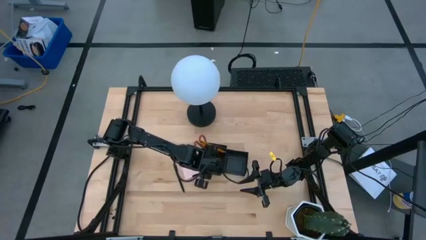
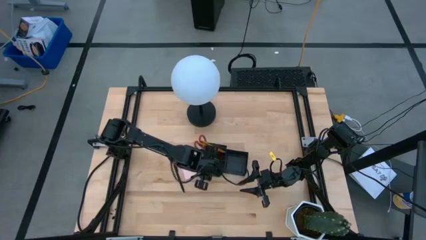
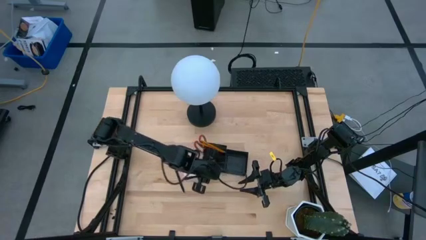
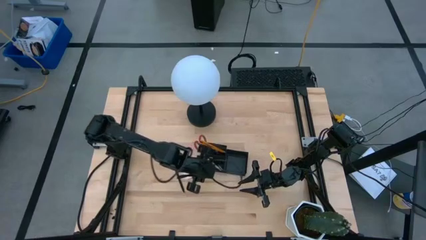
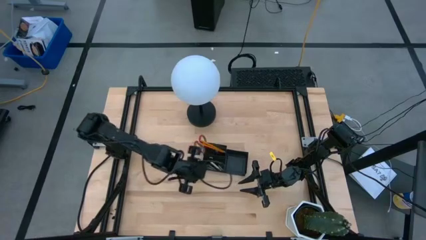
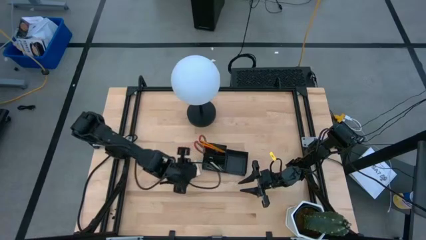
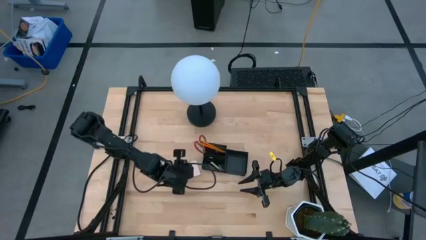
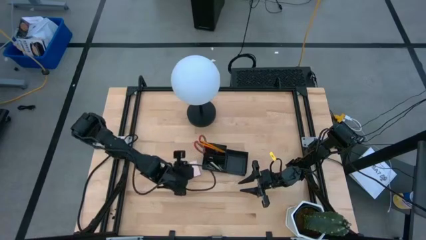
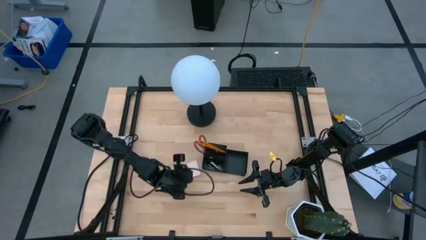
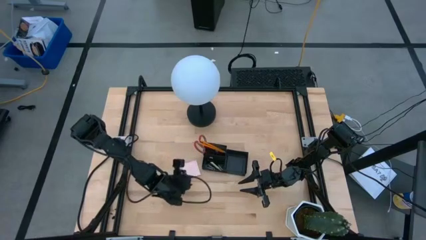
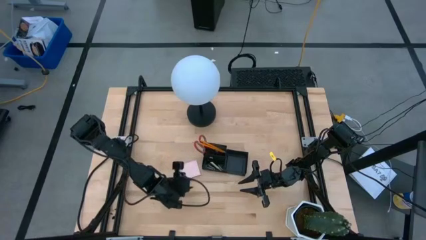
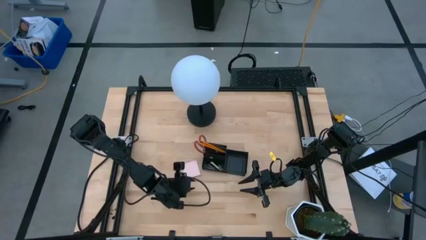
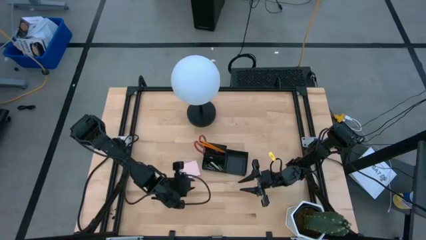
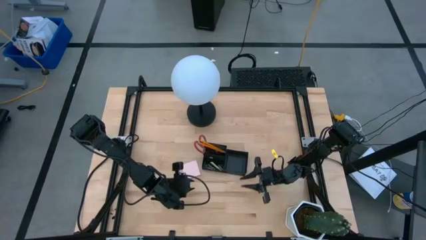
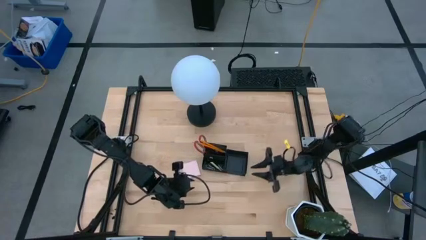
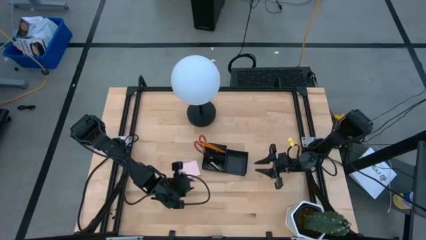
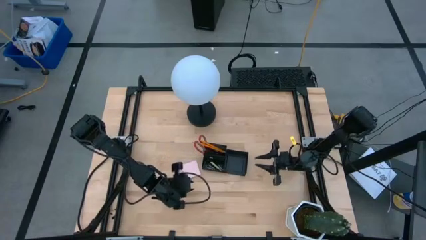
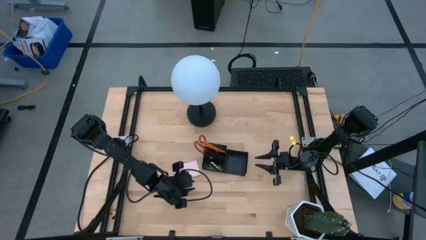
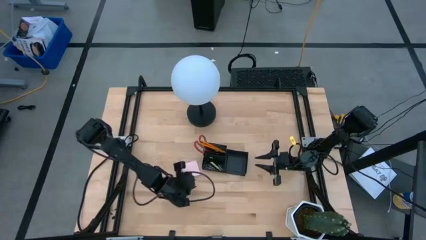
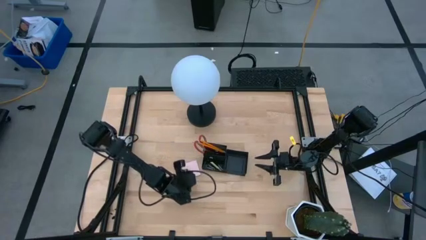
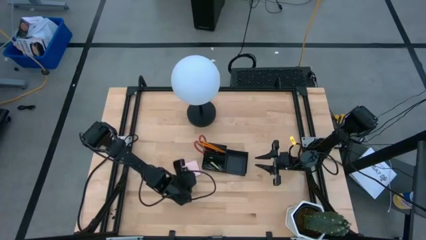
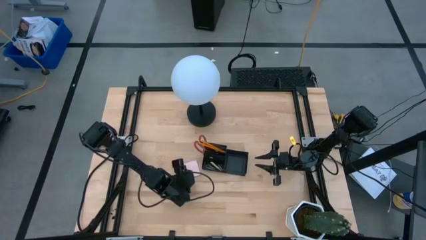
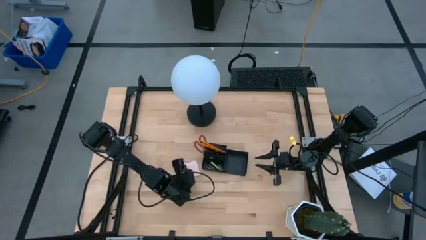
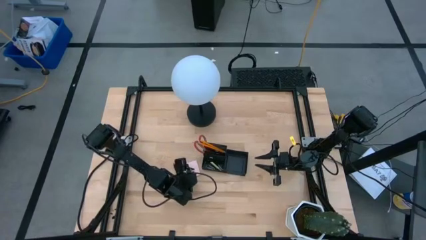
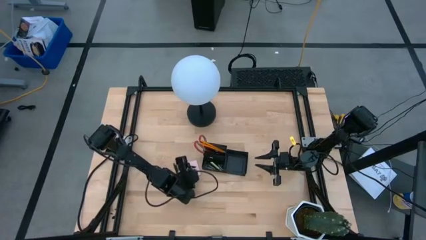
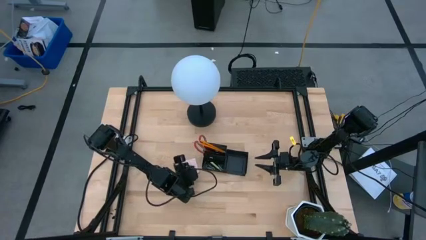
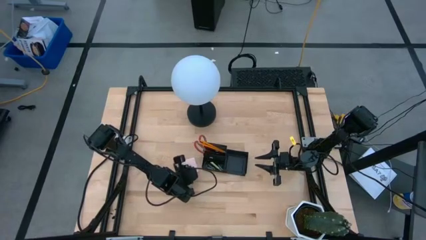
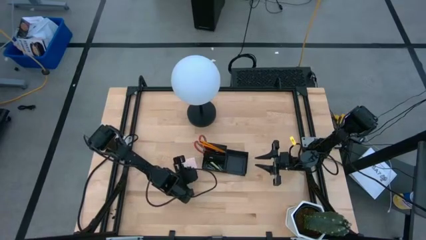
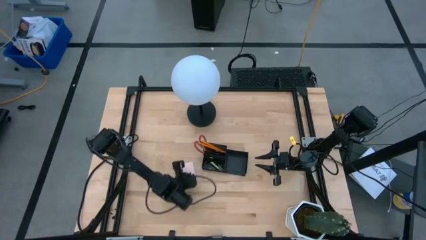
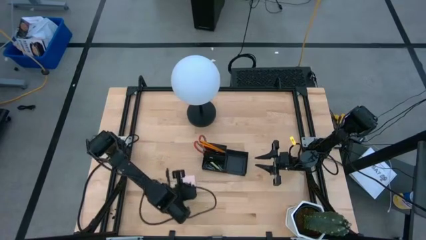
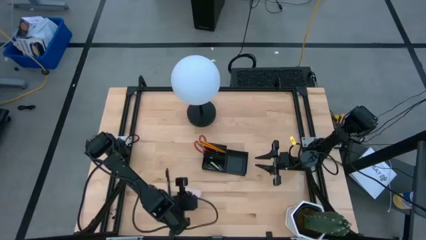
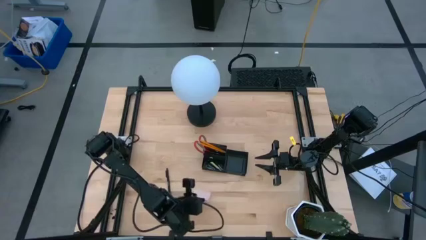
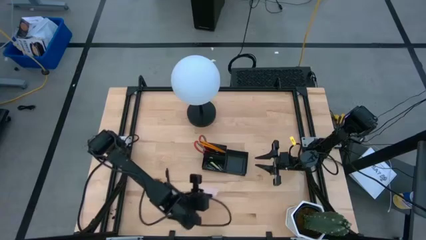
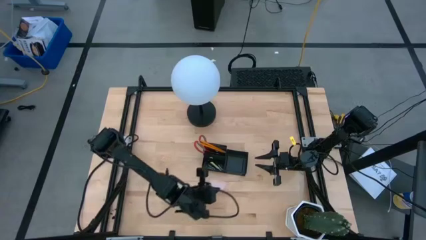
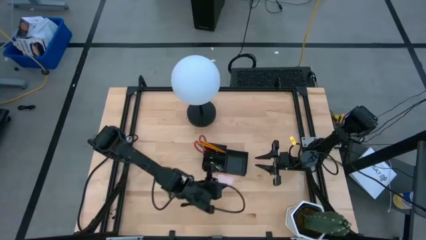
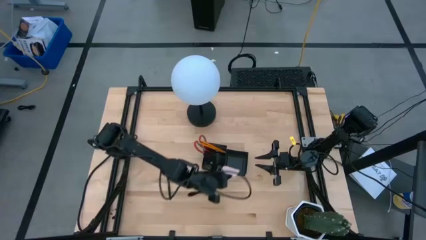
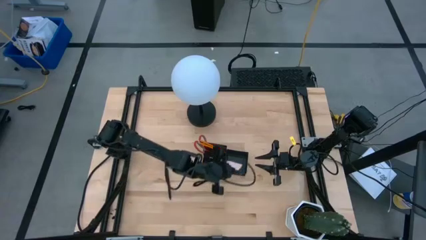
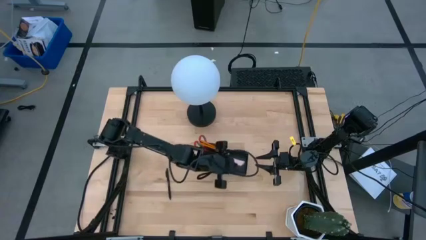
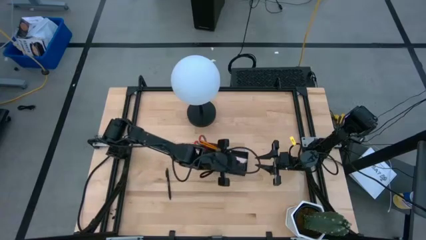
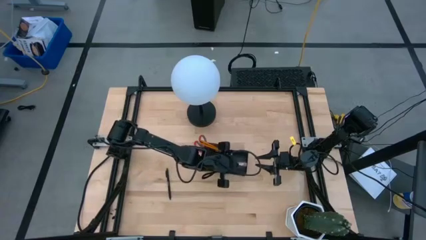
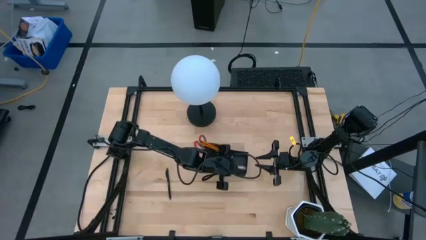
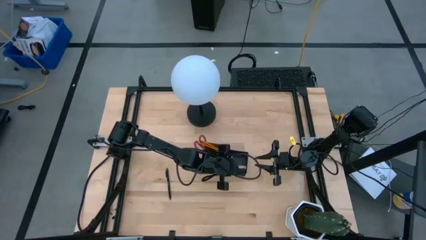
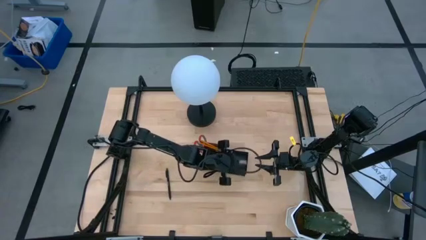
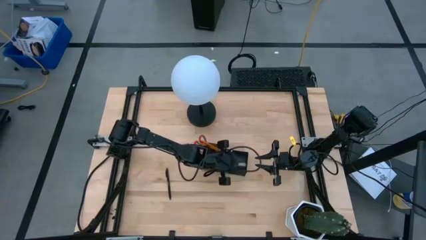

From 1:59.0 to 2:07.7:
Task: Pick and place office supplies into organizer
Put the notepad into the desk organizer

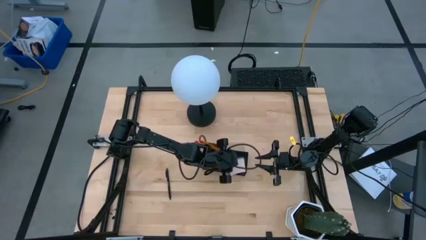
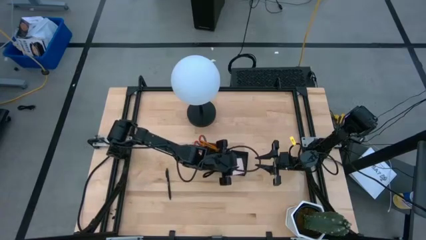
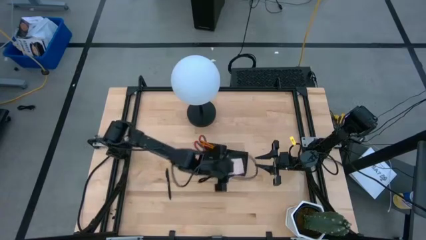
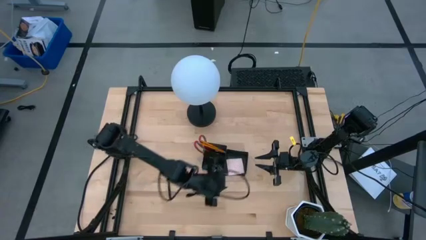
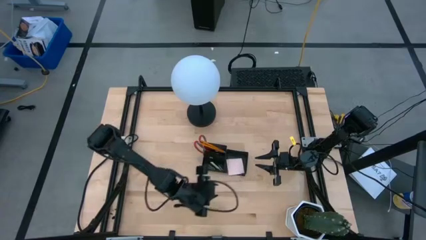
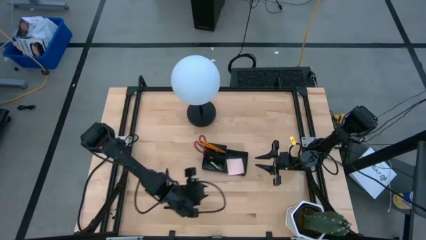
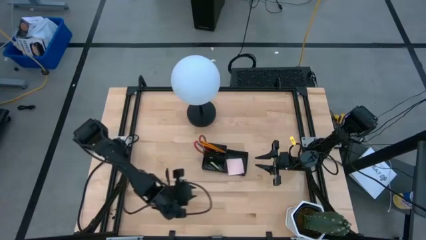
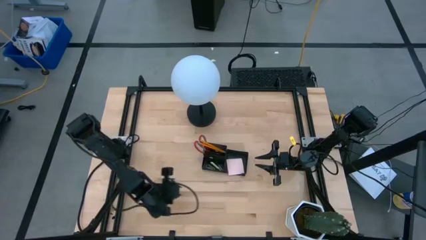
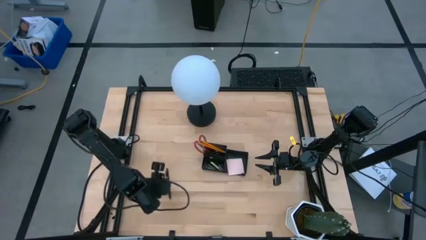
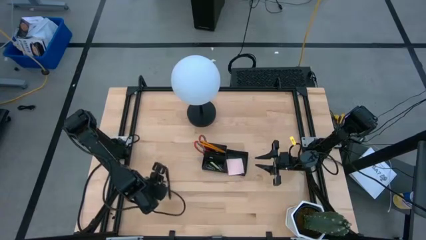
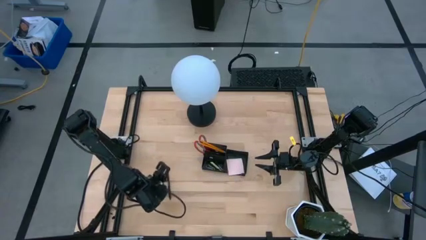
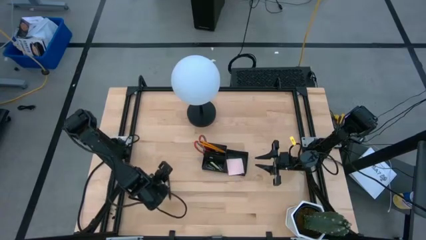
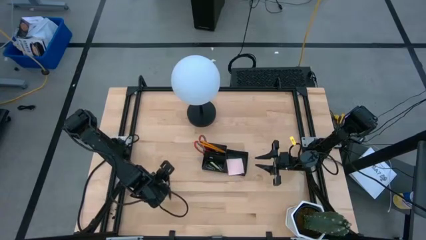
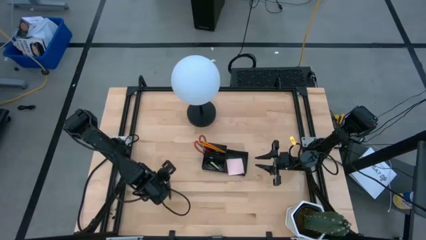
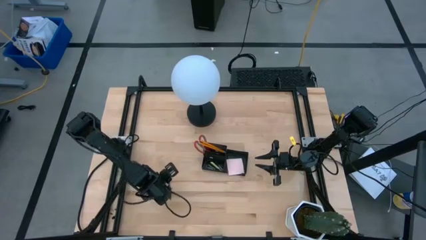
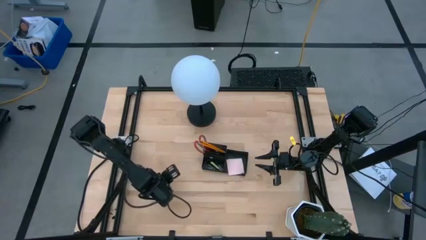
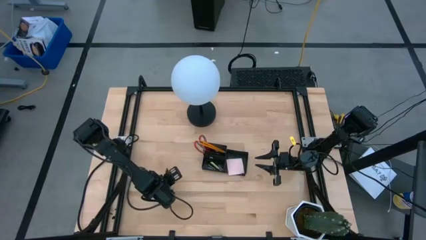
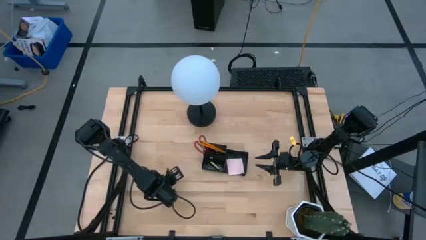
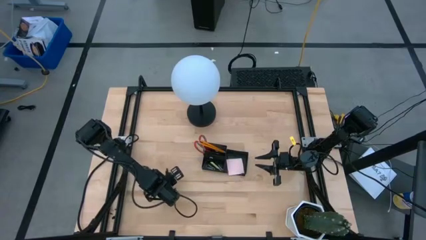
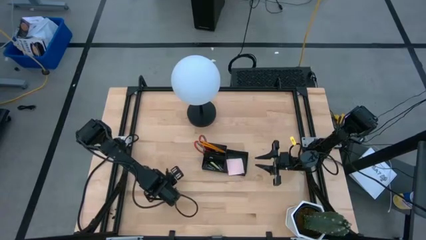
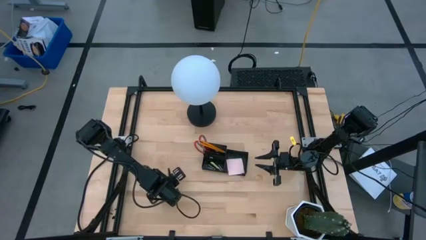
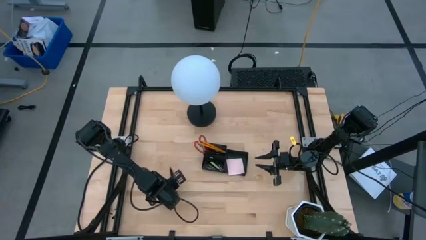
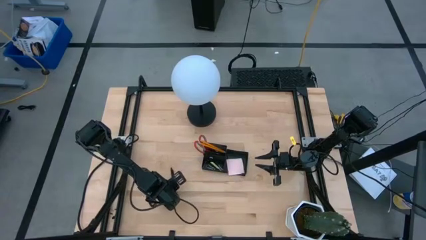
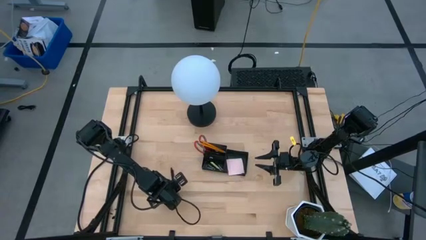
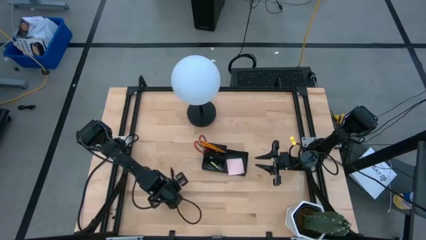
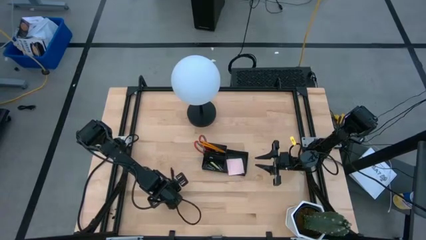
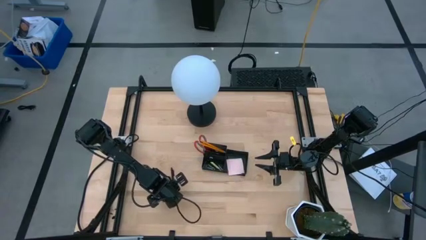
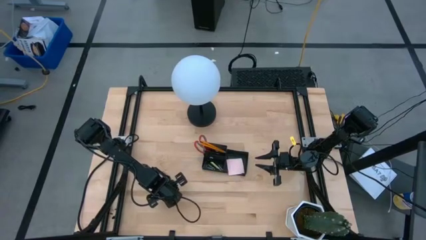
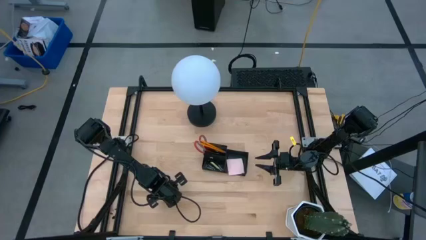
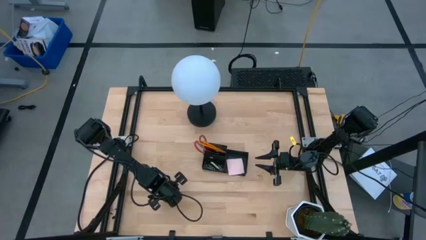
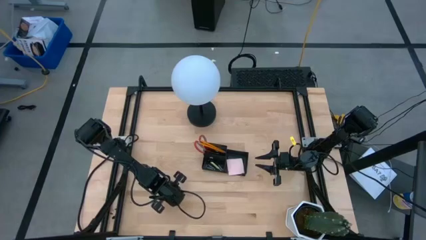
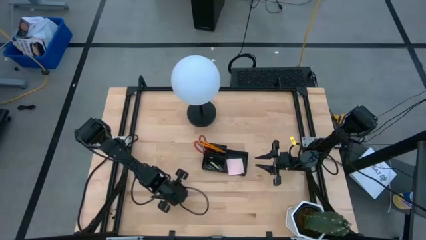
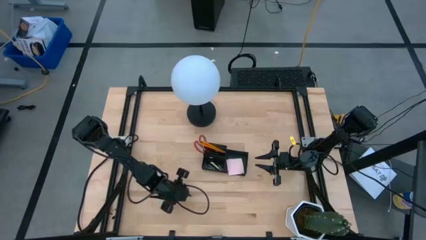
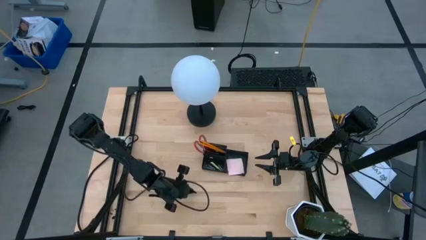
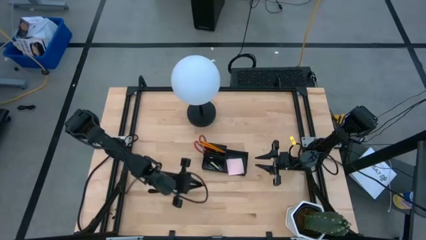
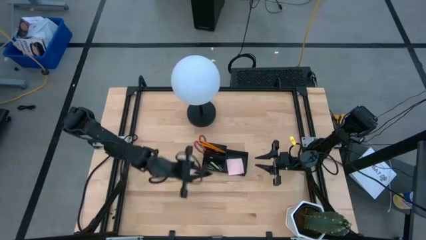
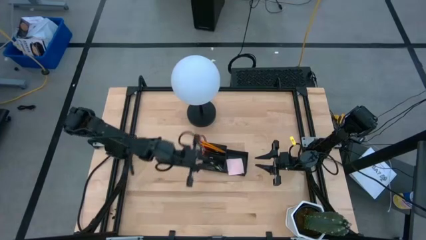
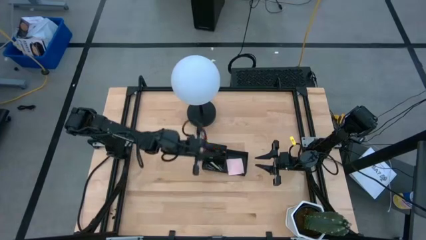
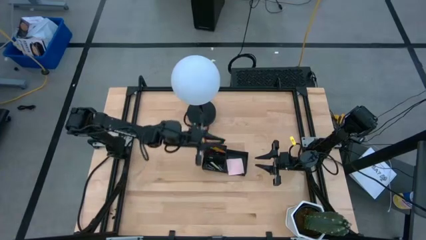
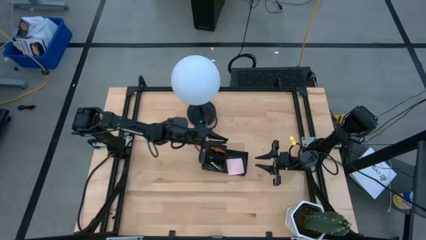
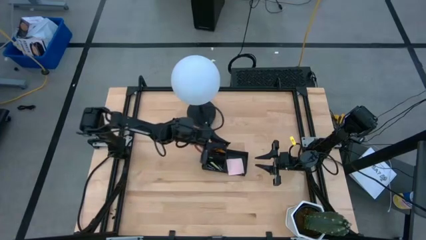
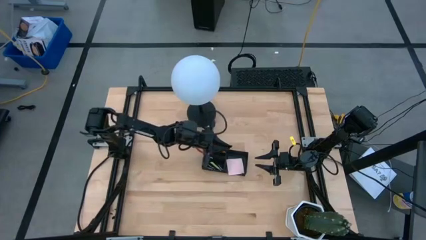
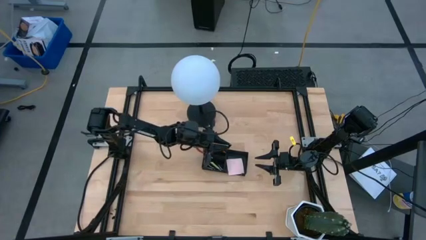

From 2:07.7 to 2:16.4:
Put the black pen into the desk organizer
